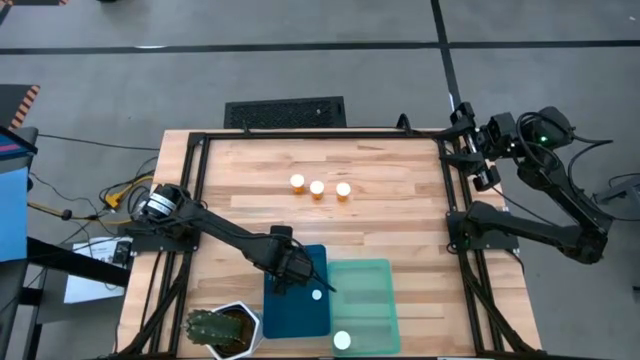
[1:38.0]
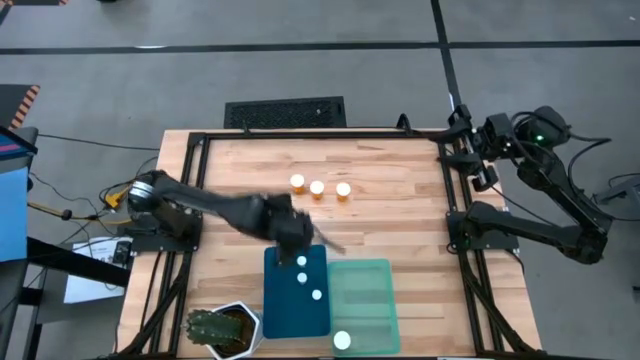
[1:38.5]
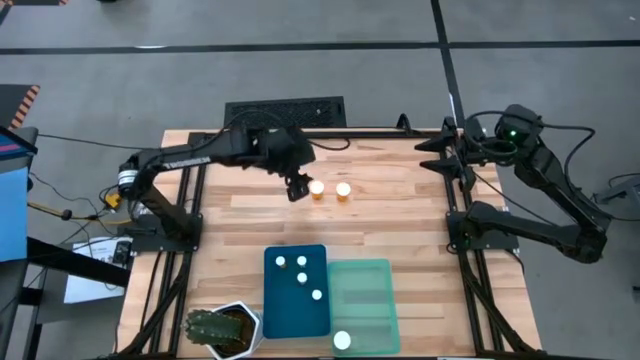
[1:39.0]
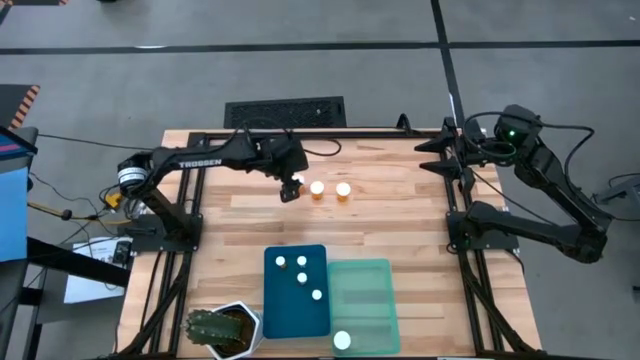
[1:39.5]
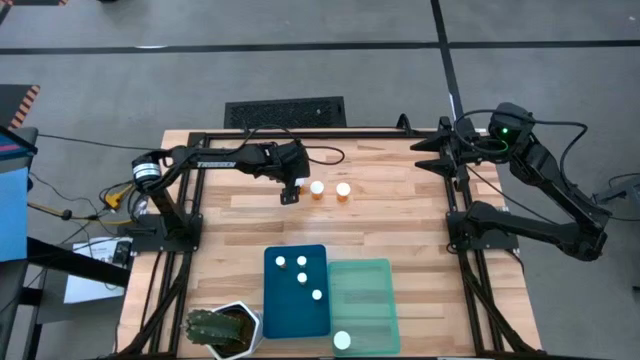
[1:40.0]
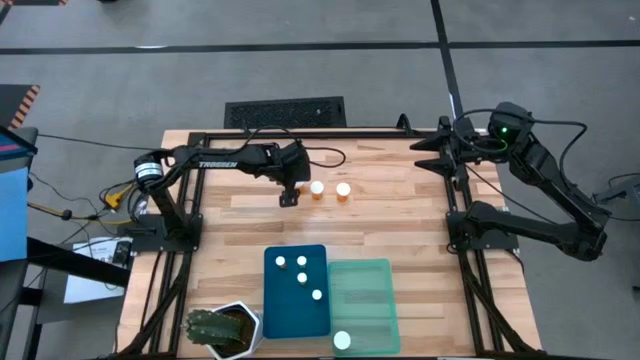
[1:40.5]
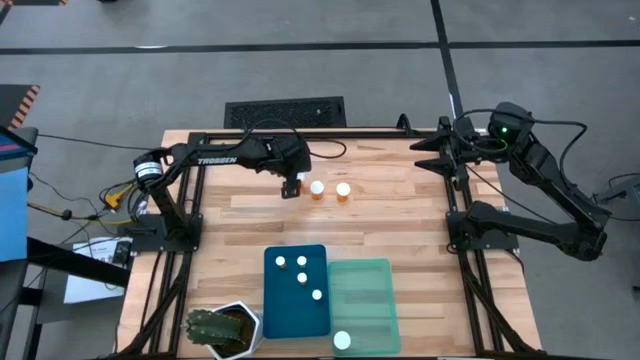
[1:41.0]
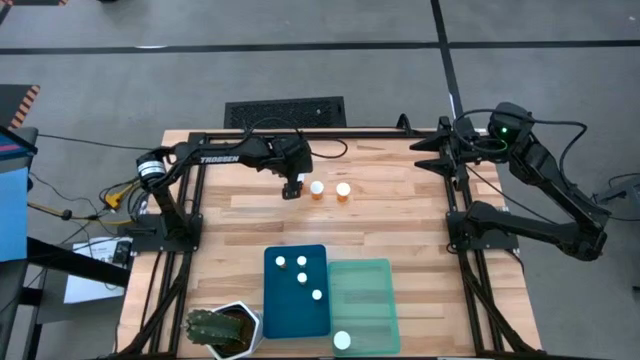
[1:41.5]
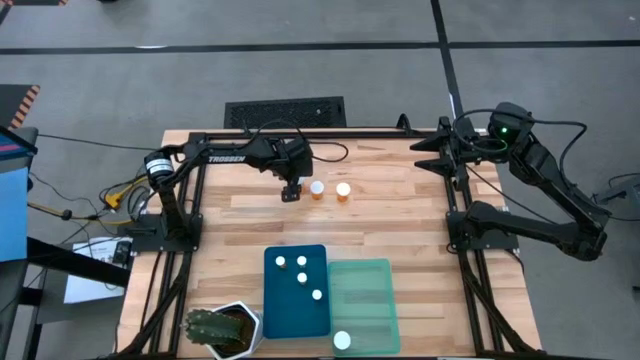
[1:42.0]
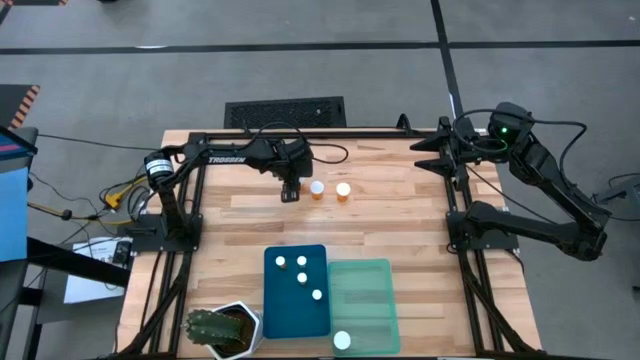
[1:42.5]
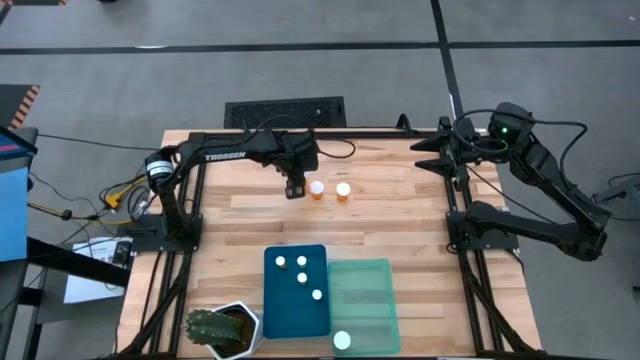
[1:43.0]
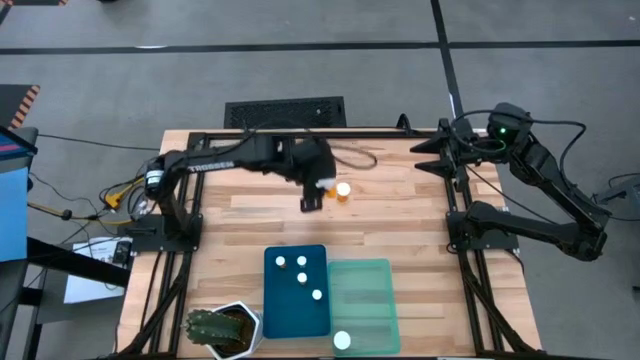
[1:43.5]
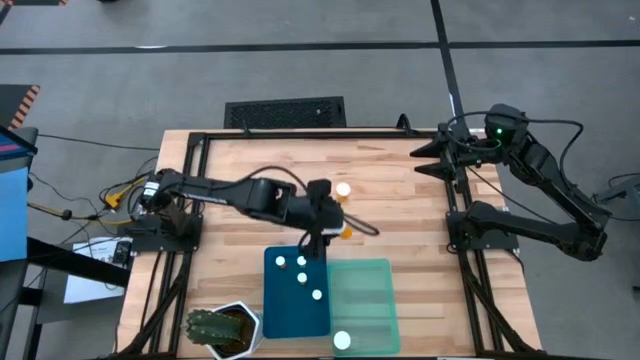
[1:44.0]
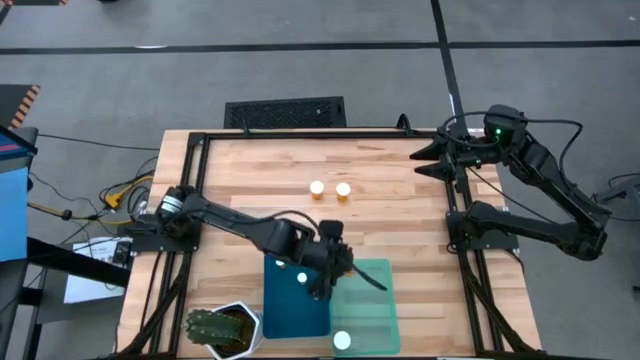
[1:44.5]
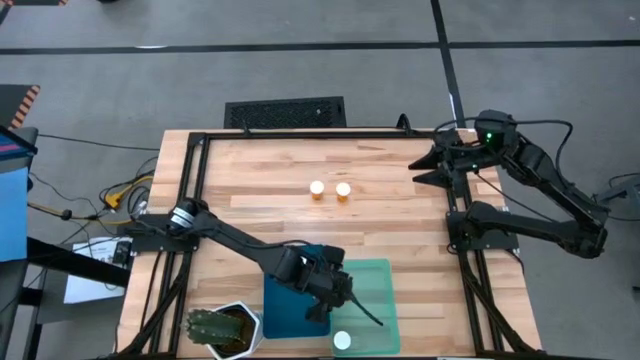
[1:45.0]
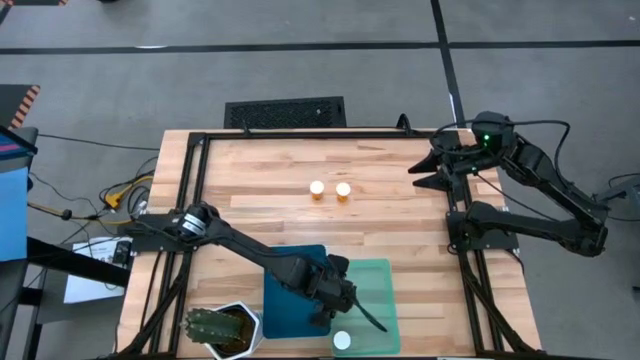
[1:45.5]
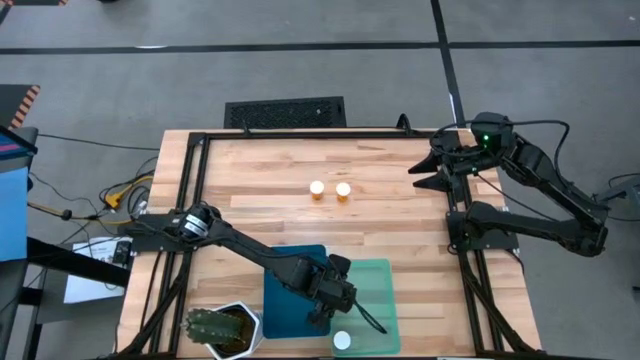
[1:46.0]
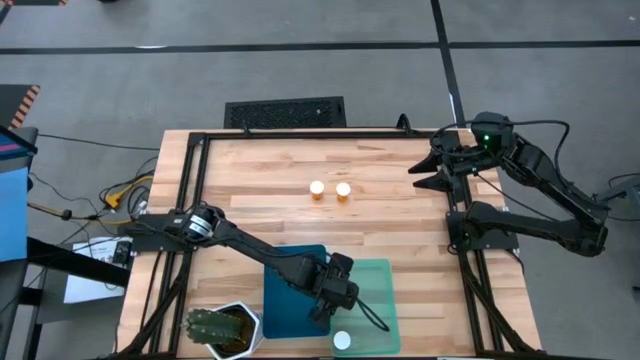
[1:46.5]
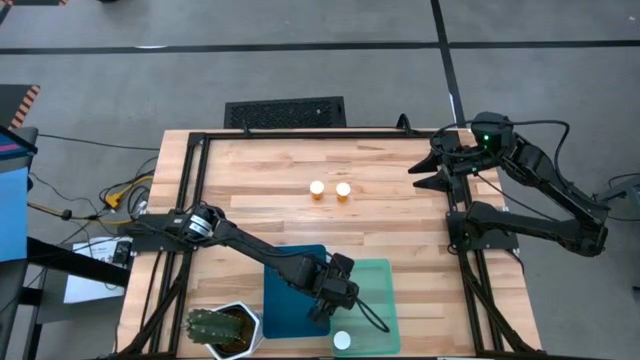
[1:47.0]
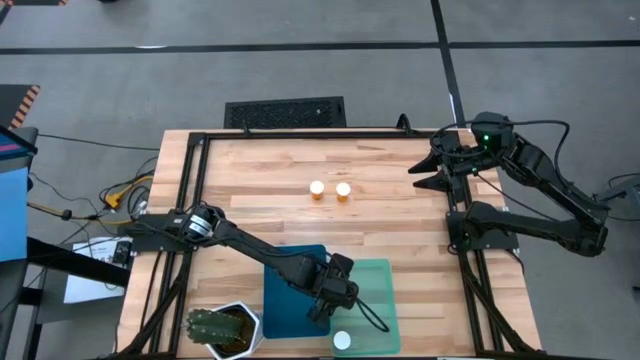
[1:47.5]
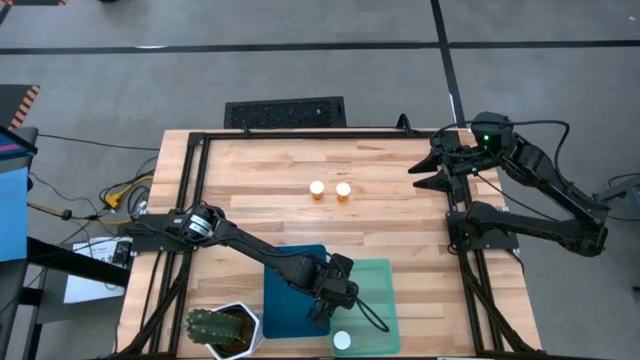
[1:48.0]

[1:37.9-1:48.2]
Task: Pick and place medicine bottles into bin by pill shape (circle, oval)
Put the left large orange pill bottle into the green bin

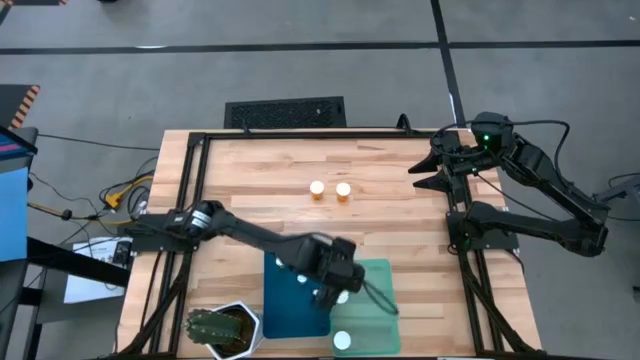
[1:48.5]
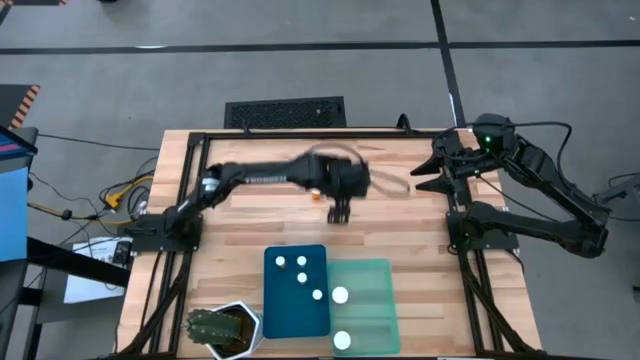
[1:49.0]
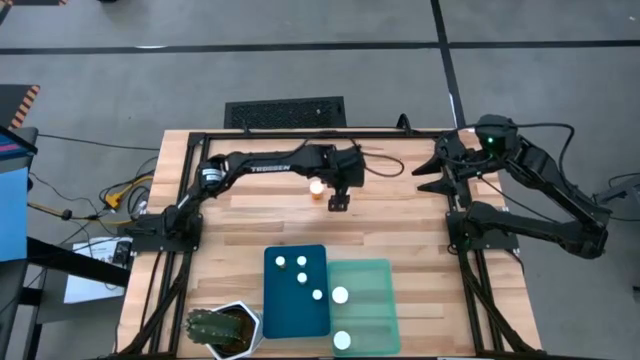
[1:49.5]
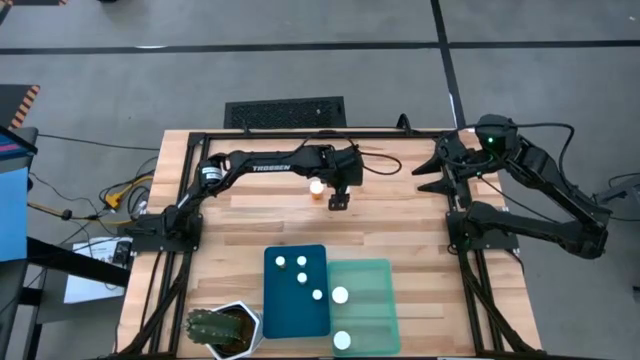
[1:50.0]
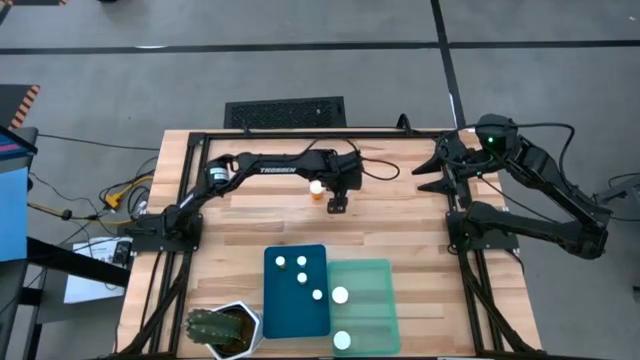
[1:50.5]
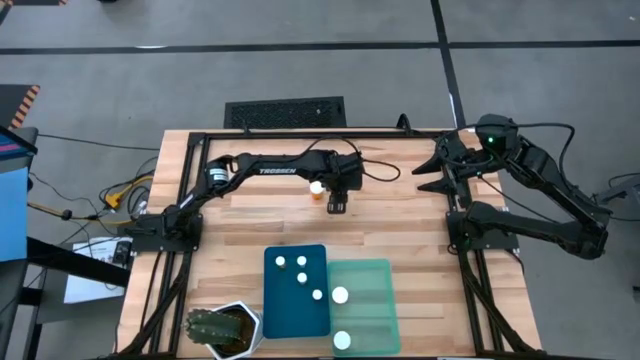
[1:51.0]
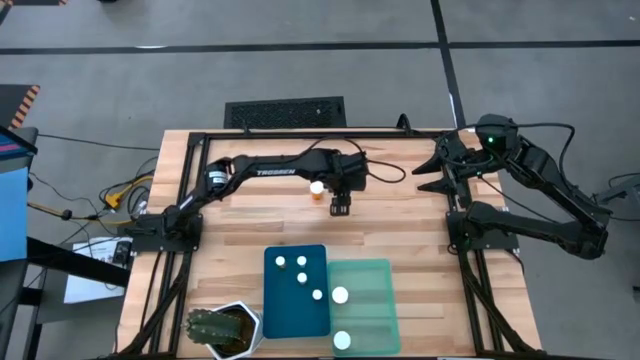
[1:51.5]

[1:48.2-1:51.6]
Put the right large orange pill bottle into the green bin

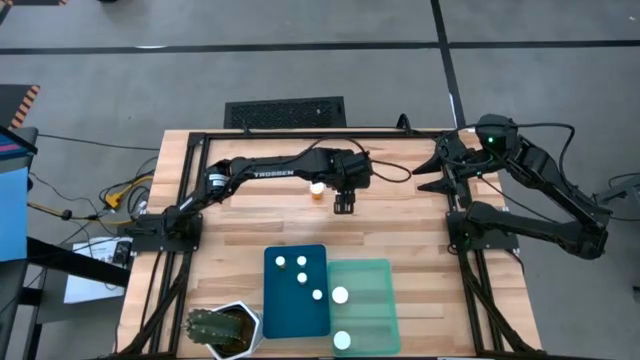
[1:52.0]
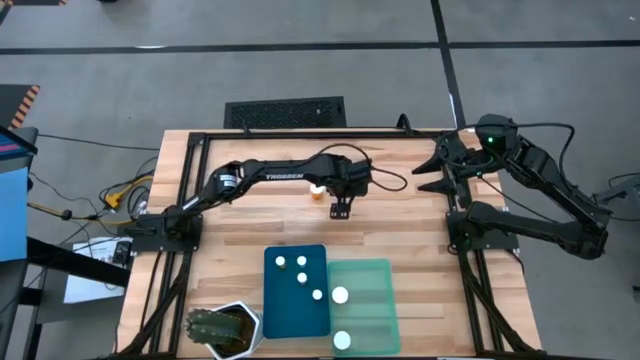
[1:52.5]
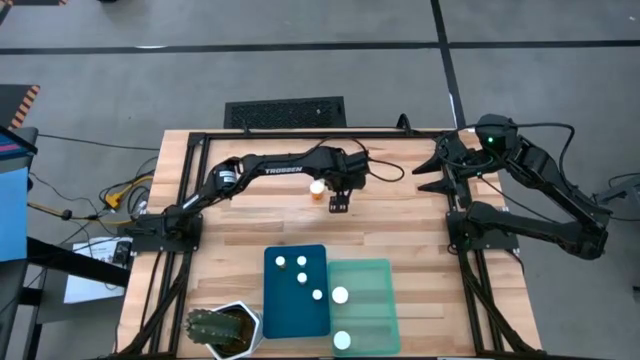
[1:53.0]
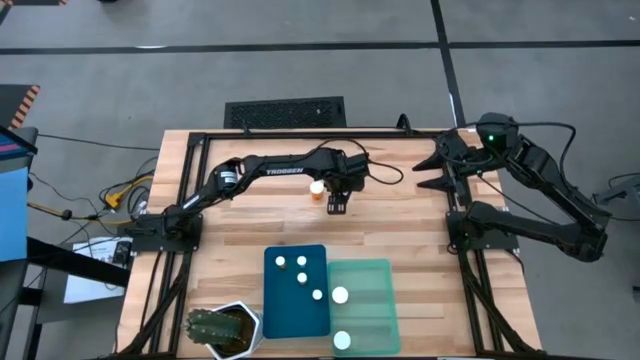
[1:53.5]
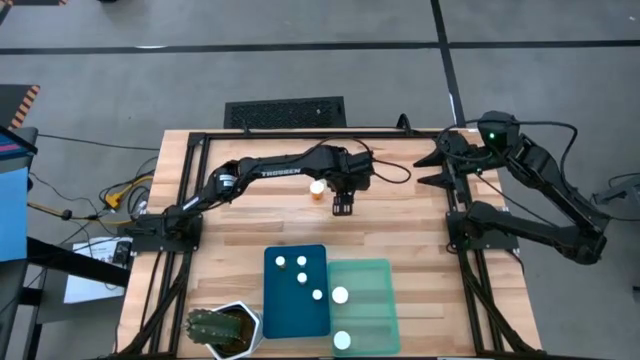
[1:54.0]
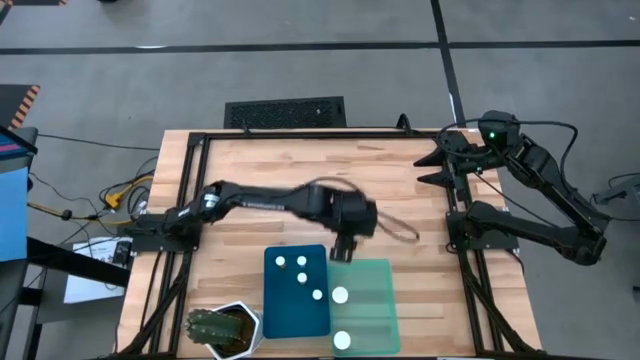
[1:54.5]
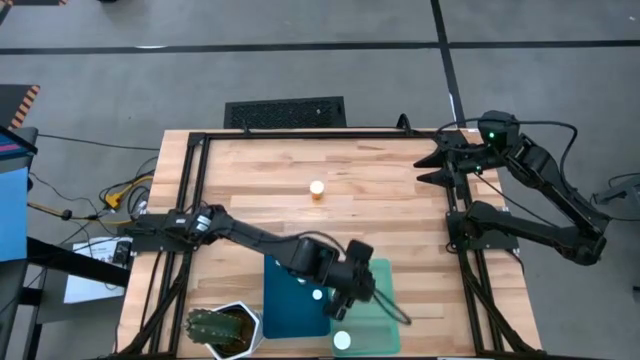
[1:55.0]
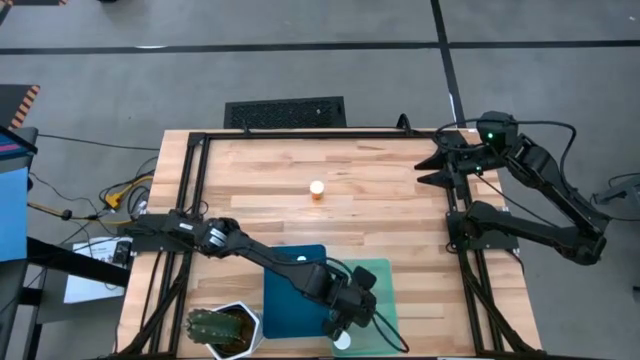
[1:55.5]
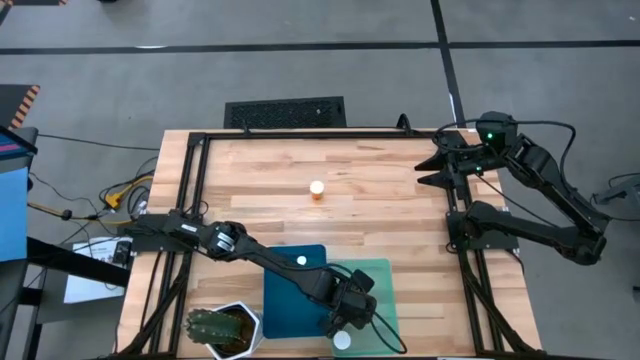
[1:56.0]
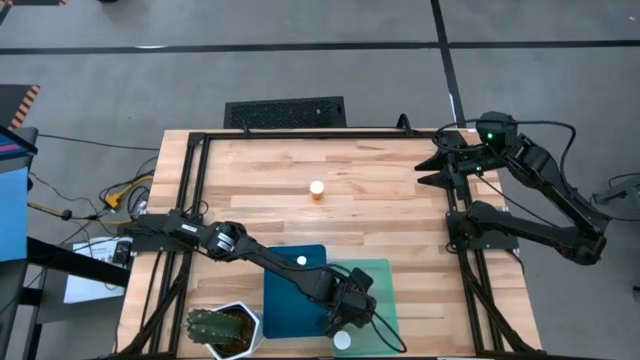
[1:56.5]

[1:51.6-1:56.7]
Put the right large orange pill bottle into the green bin

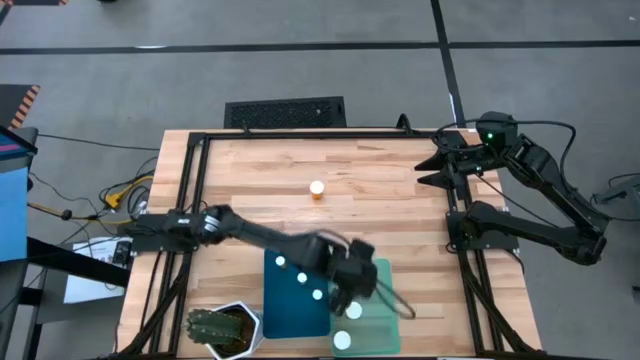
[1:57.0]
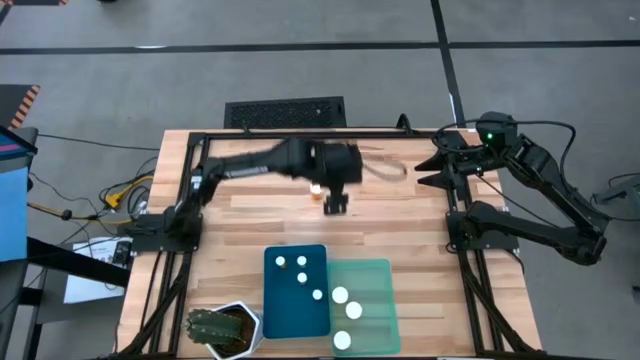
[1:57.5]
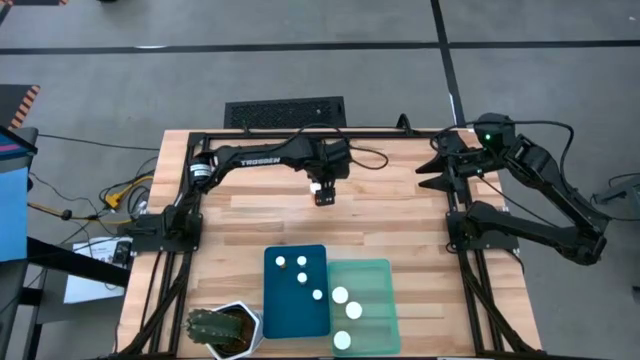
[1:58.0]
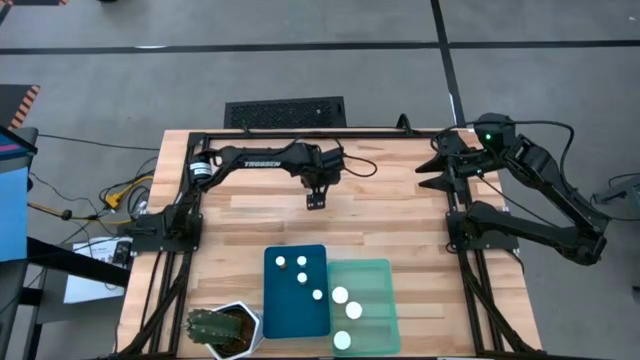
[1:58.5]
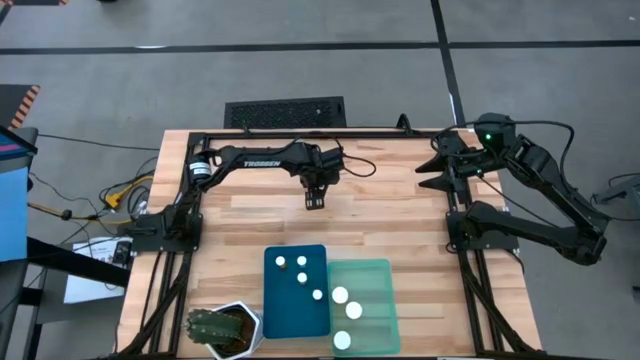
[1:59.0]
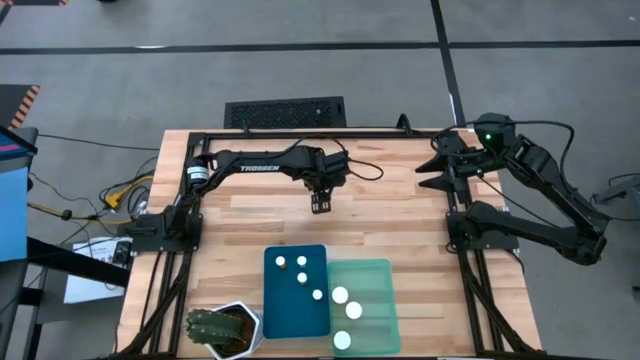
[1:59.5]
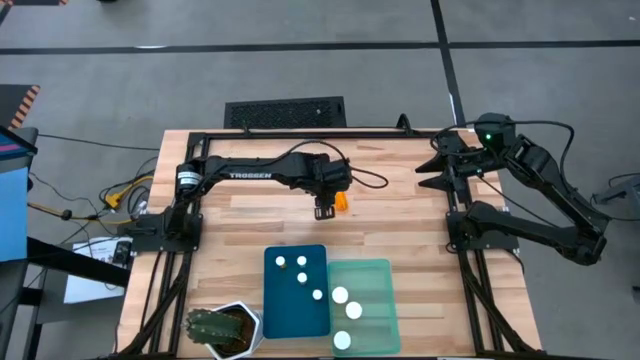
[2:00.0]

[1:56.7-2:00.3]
Put the large orange pill bottle into the green bin
